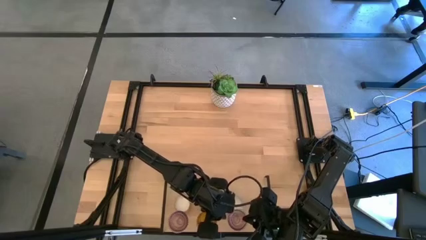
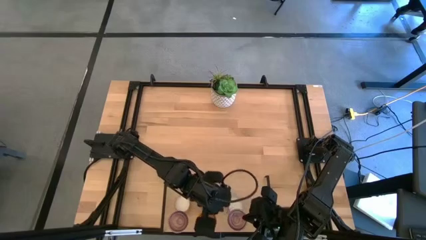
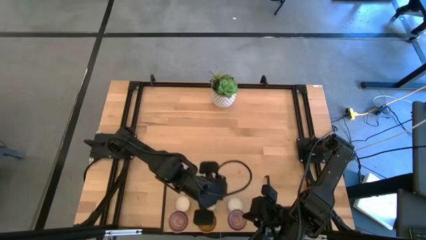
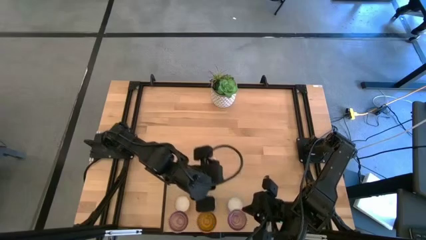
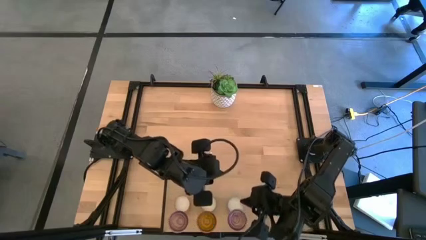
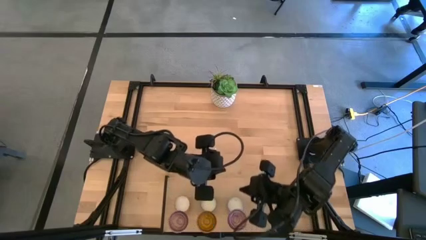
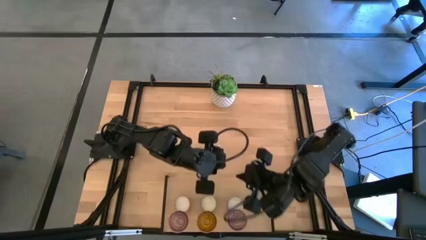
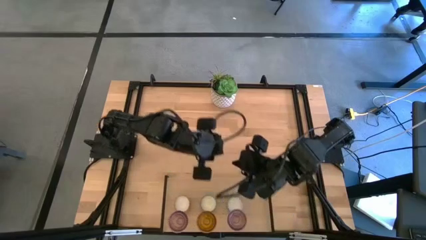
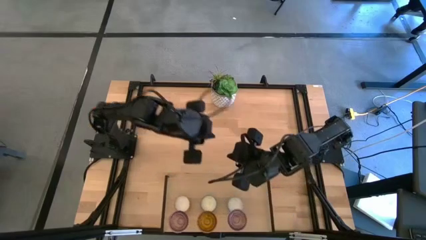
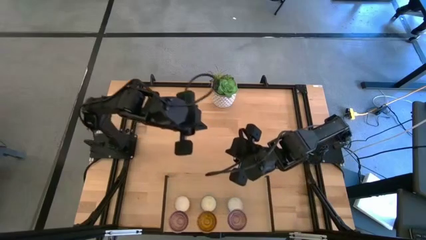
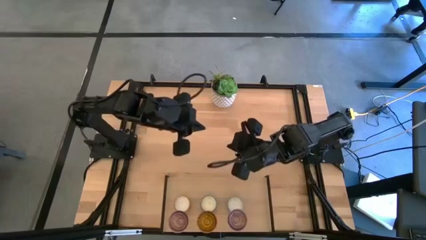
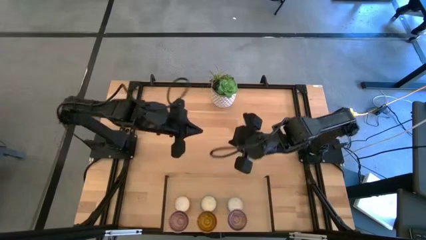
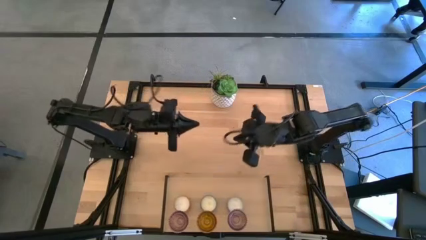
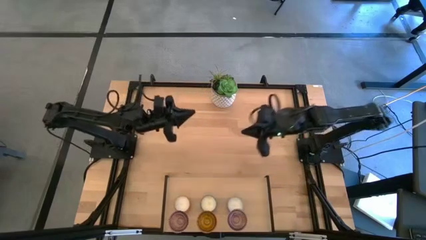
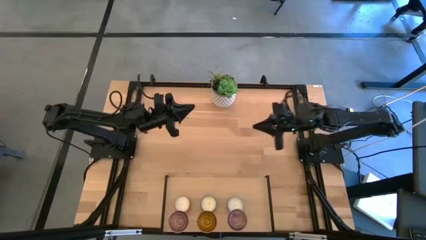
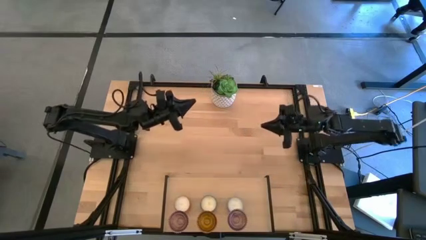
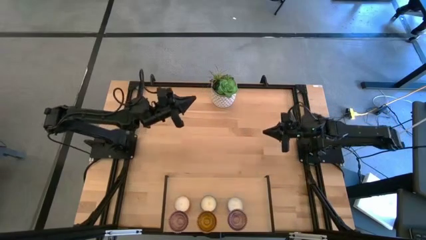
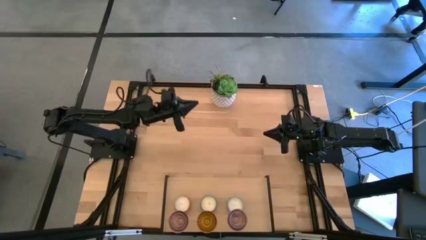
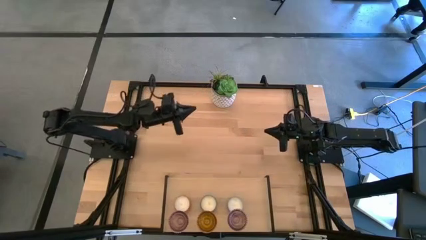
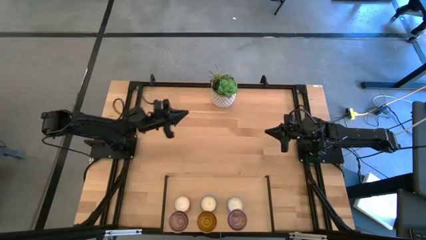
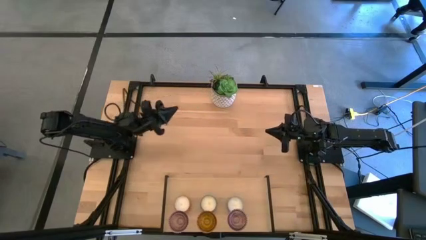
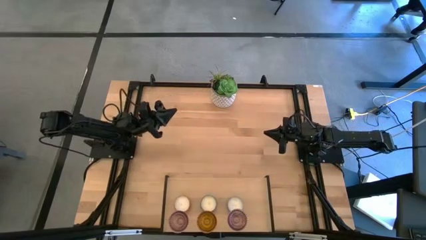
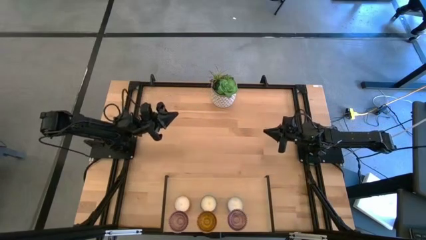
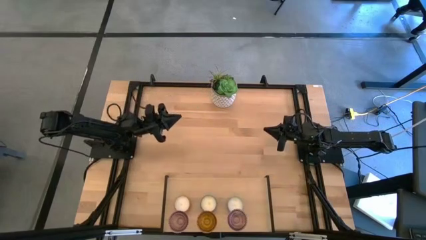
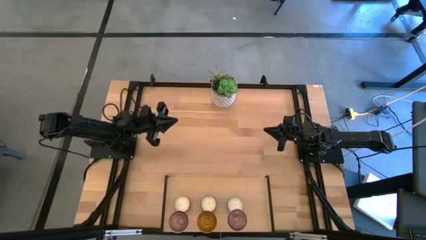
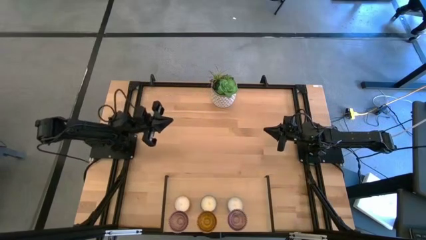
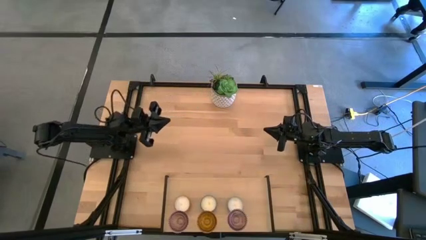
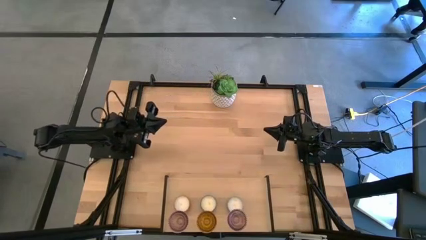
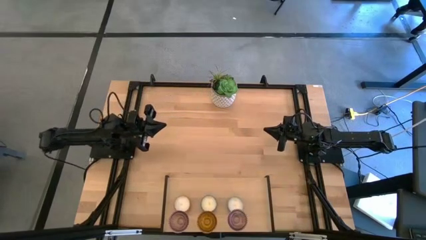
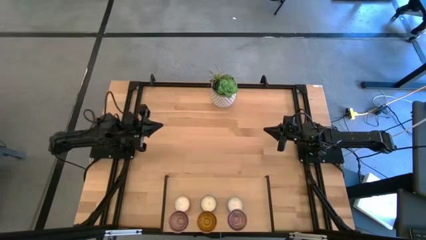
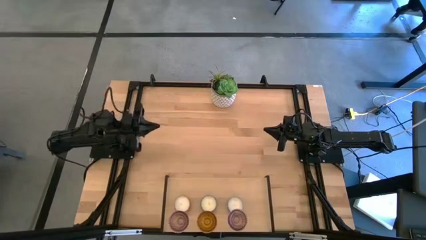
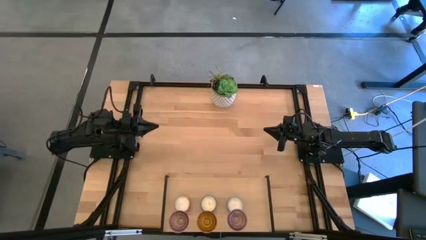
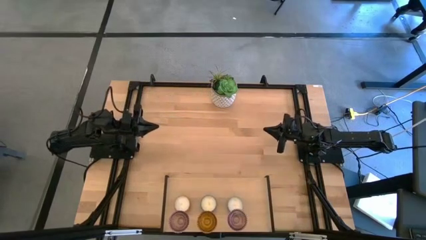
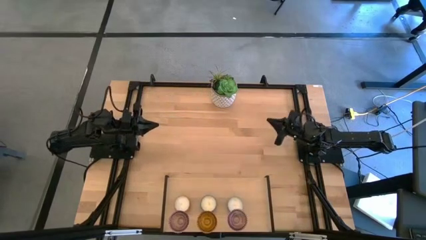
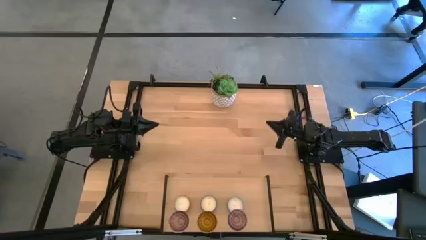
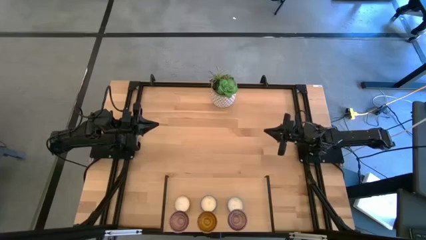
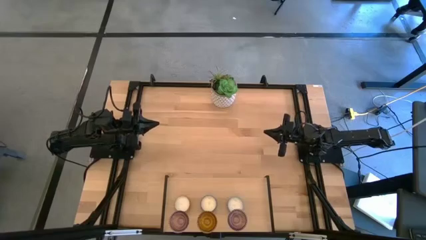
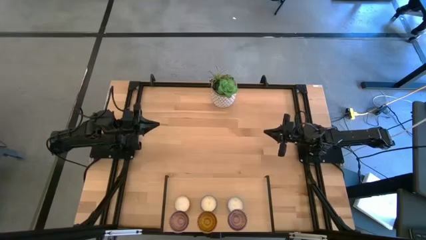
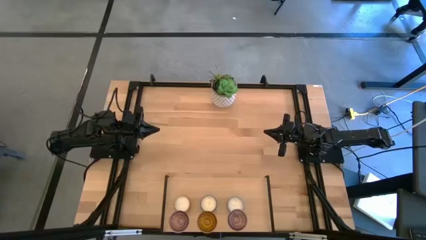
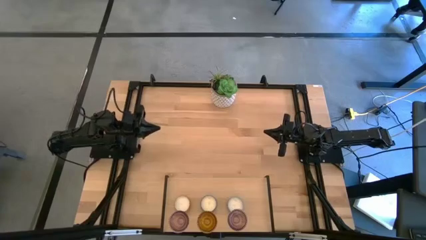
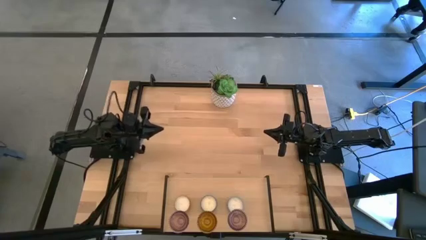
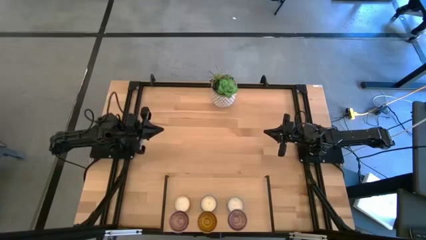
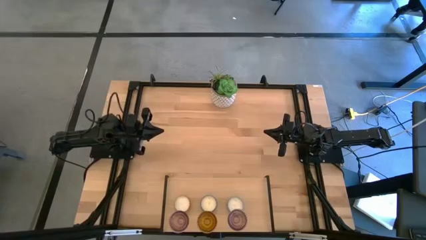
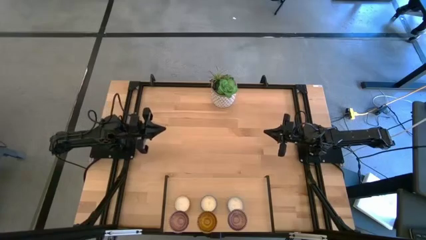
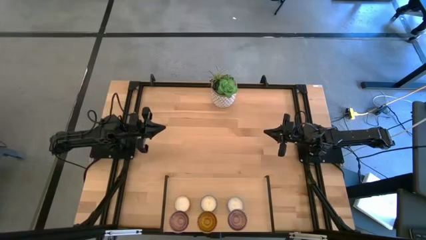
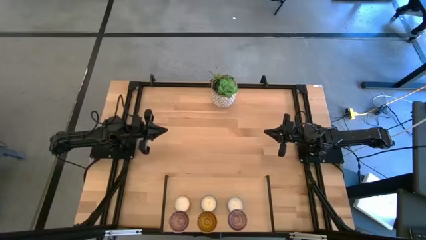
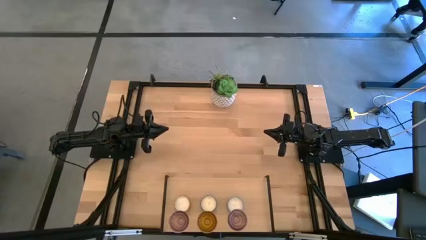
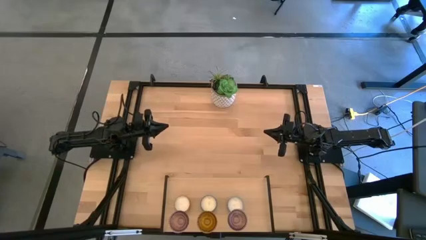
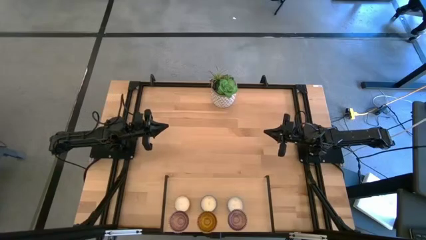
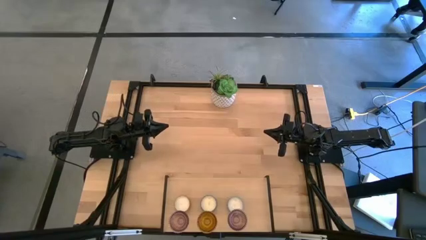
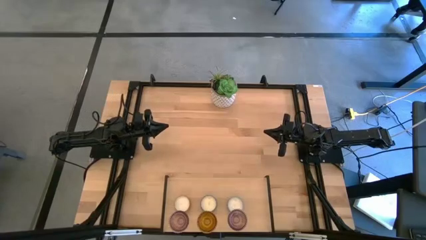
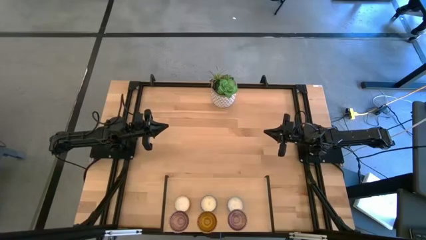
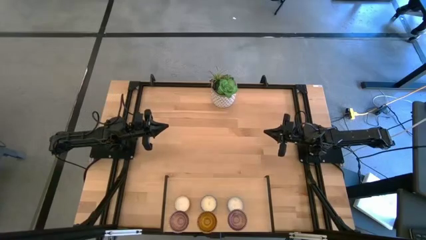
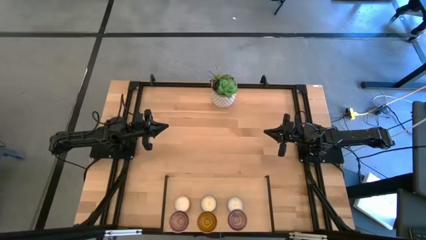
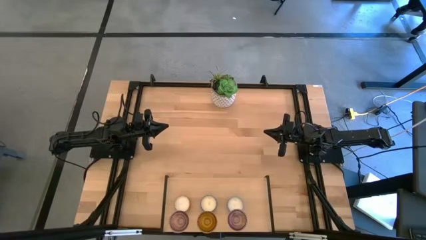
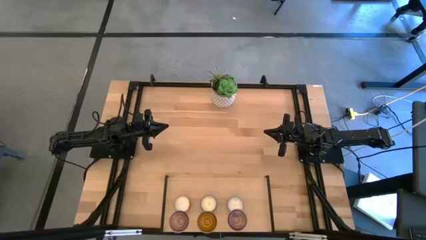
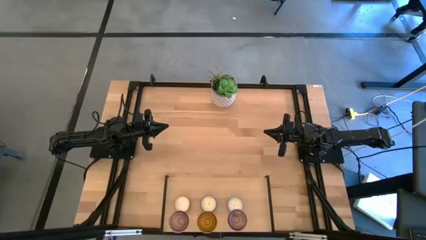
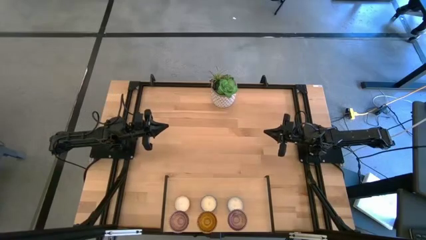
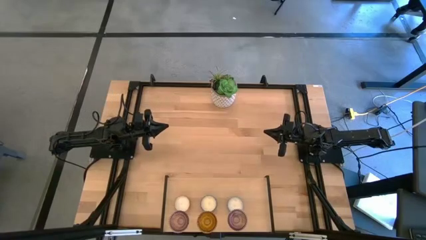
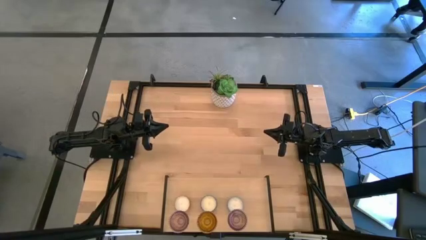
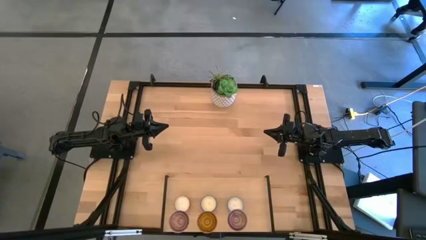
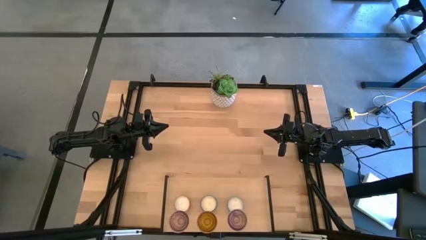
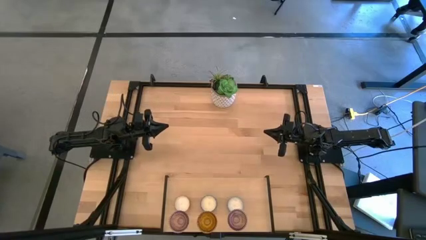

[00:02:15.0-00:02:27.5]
Task: Pick & Place candle stick holders
Return to Home Position

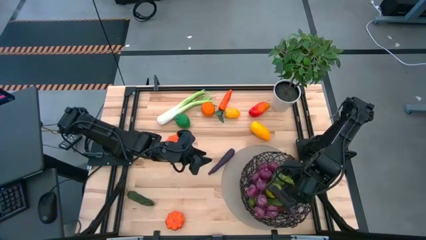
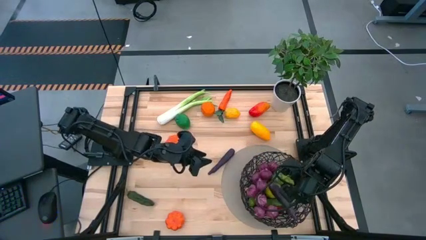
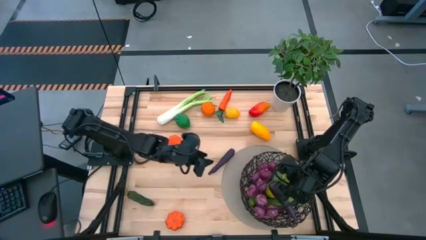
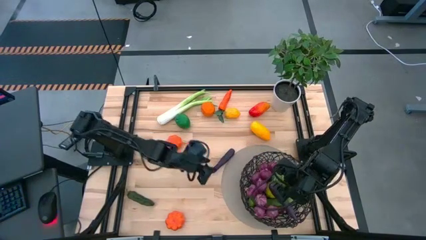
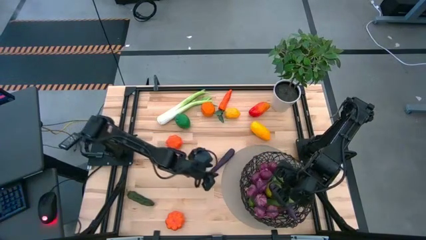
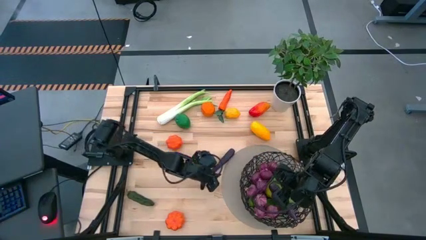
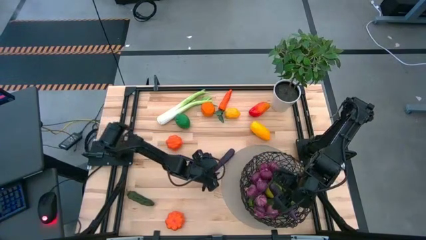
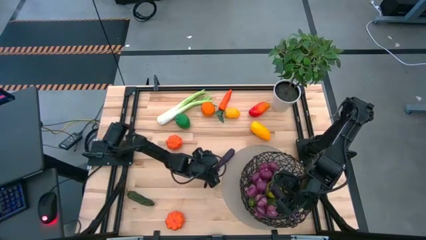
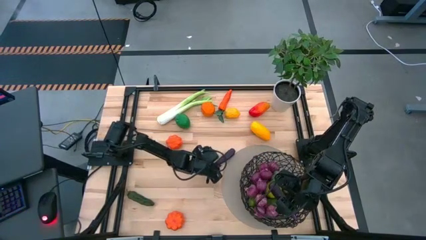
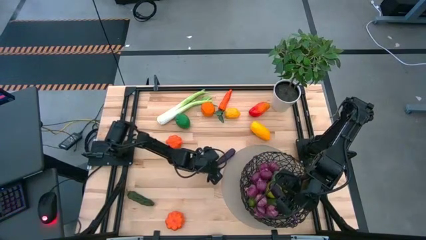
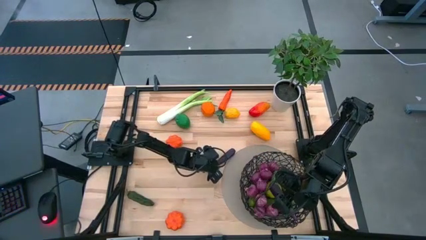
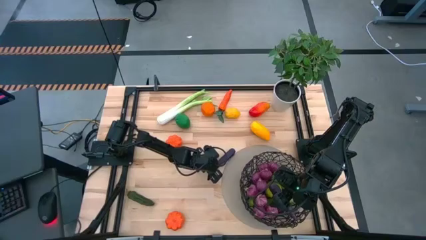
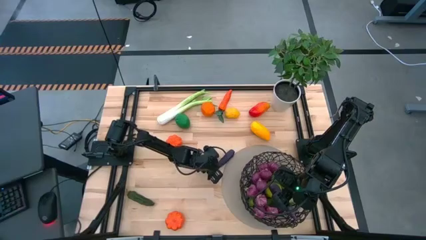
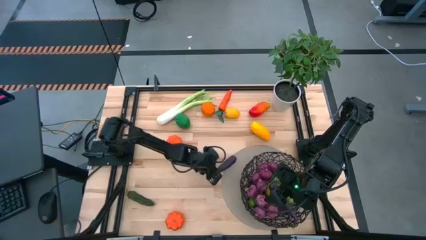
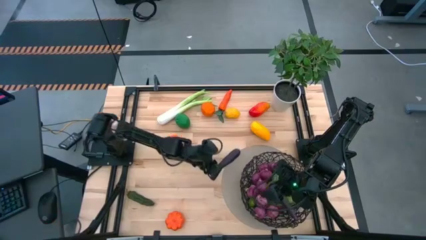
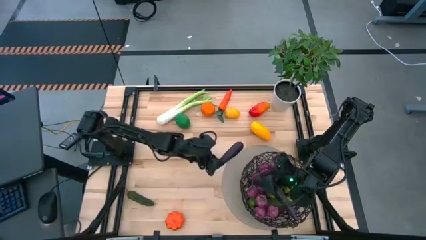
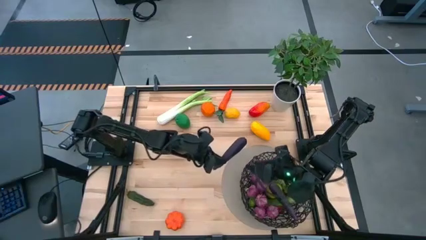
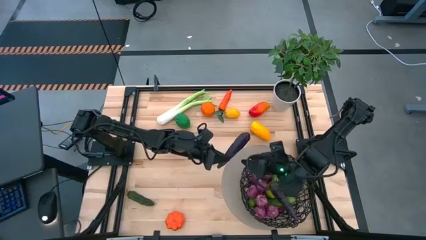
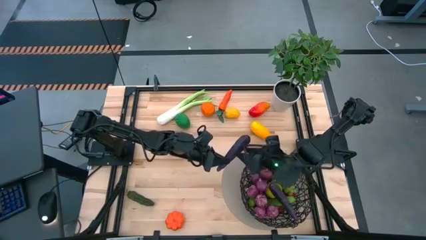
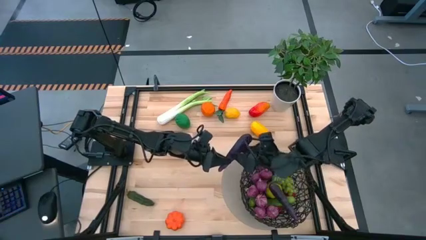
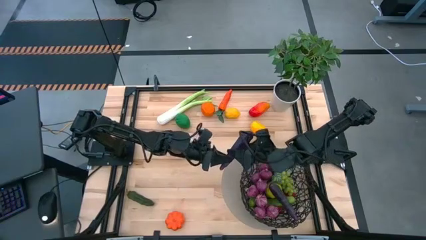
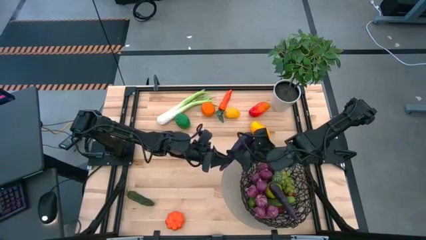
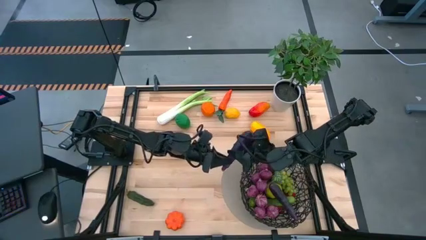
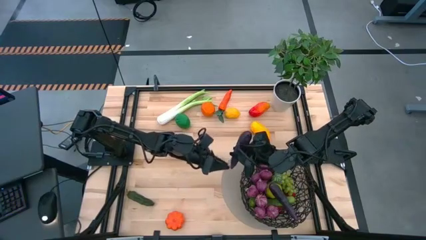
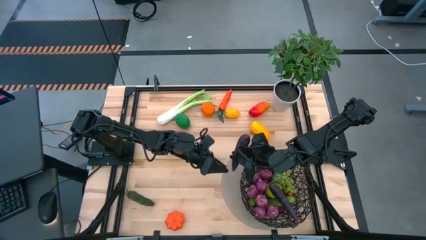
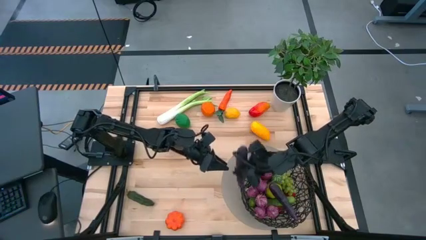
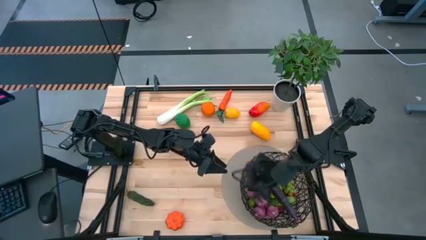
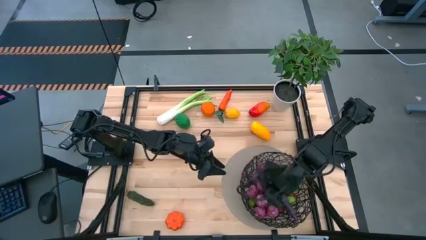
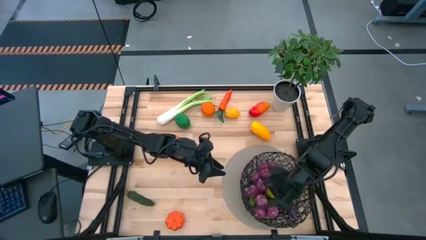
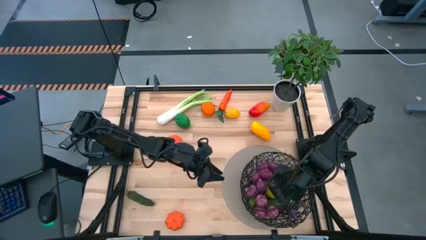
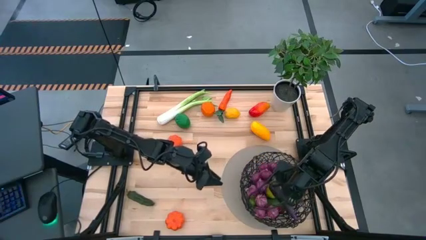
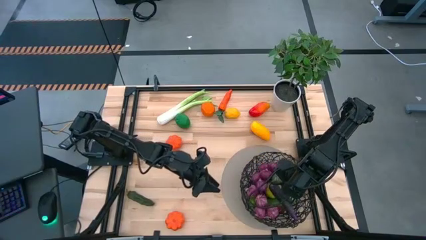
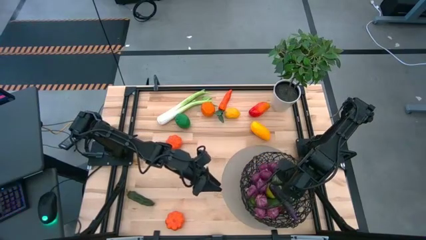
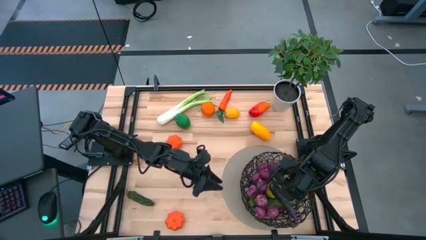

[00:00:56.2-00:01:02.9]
Task: Build produce basket
Put the purple eggplant into the black basket
